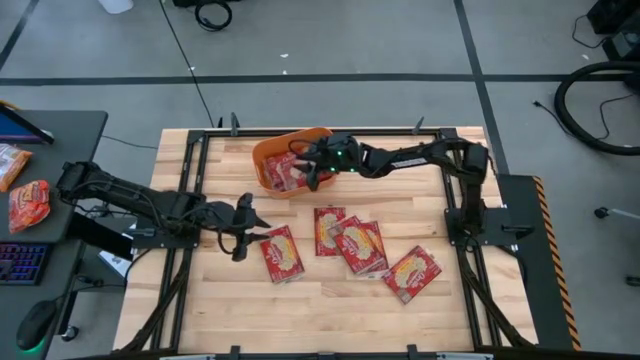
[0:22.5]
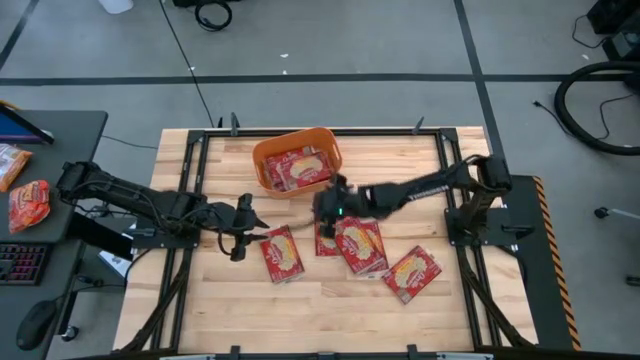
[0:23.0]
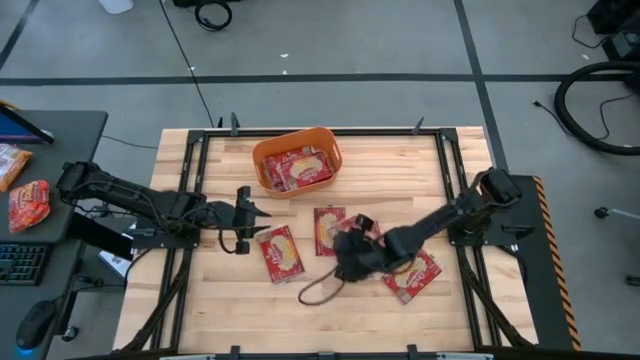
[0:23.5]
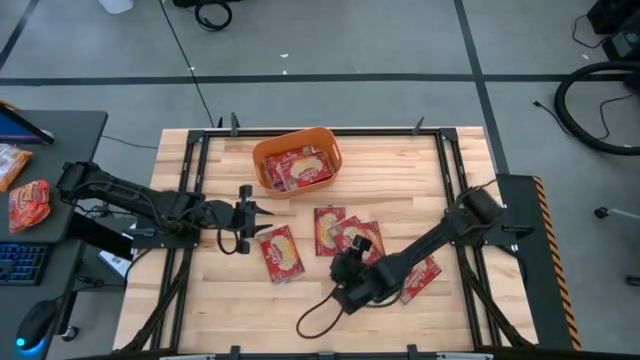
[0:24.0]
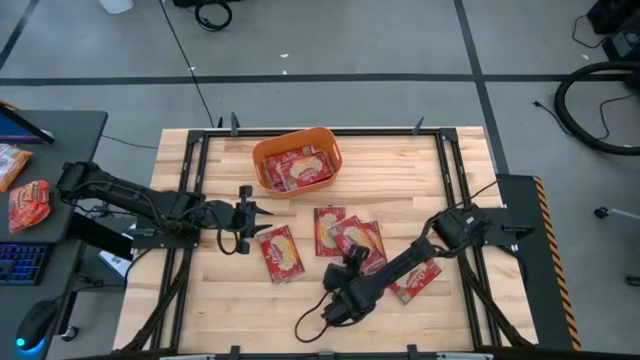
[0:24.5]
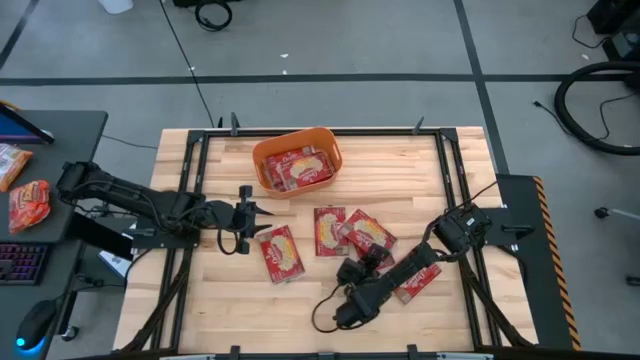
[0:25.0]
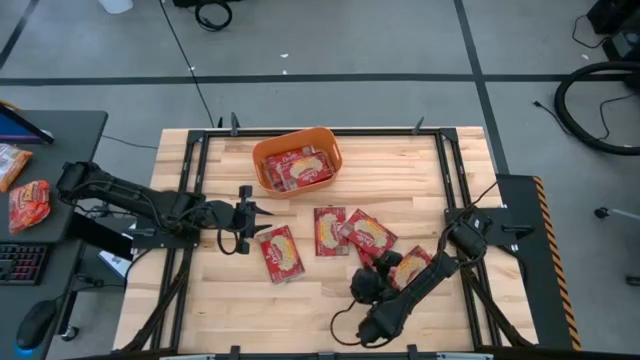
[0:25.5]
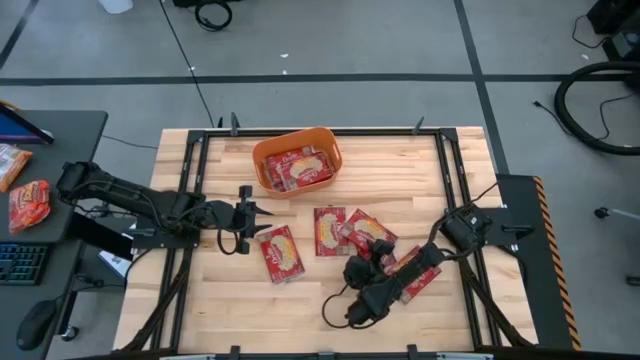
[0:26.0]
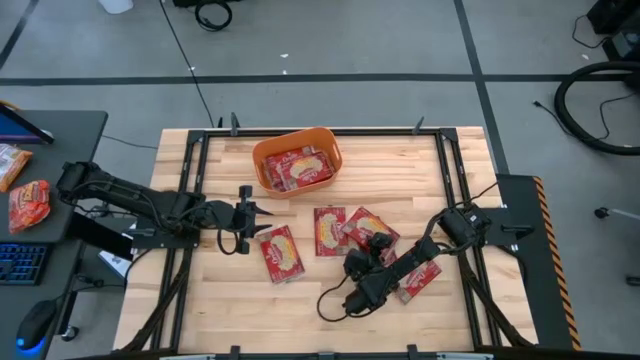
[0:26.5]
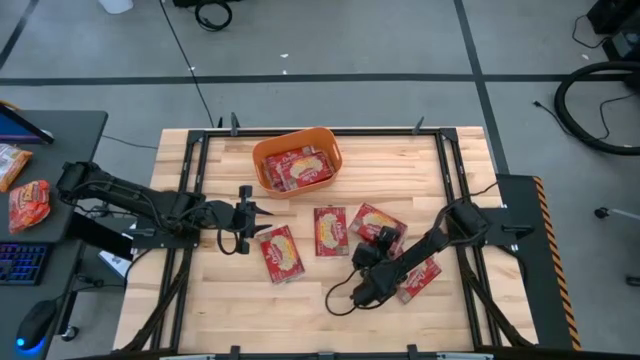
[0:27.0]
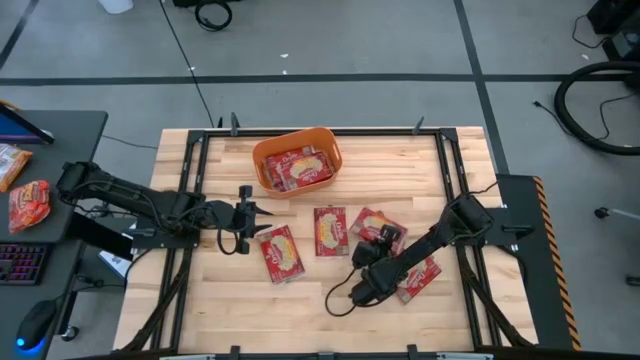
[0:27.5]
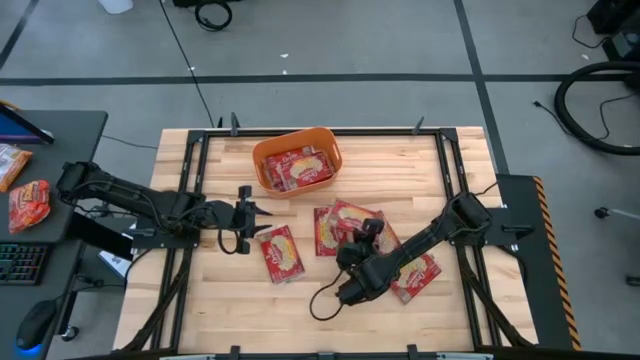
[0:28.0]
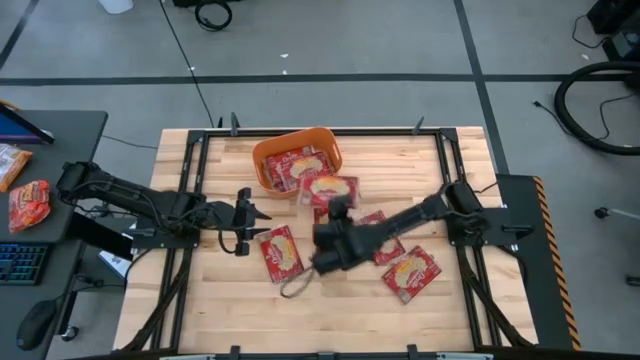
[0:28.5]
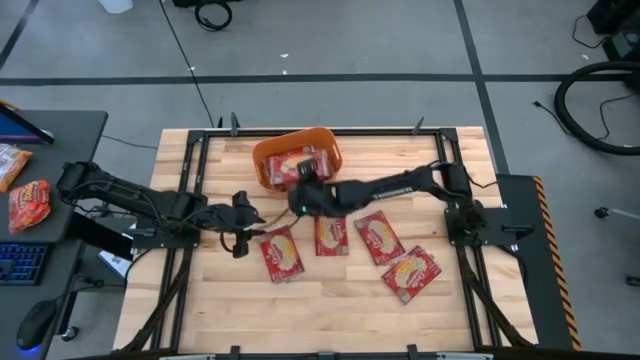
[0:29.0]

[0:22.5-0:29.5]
Task: Sort popcorn bags into baskets
Put the red popcorn bag into the orange bin

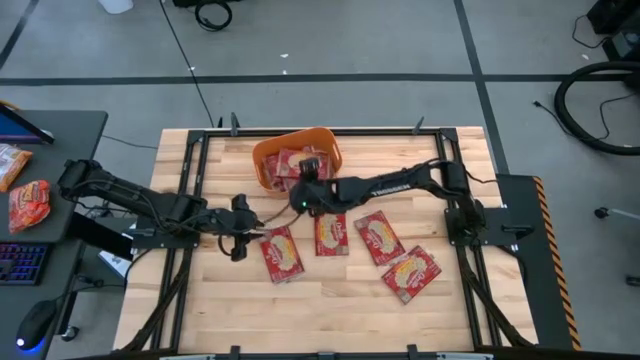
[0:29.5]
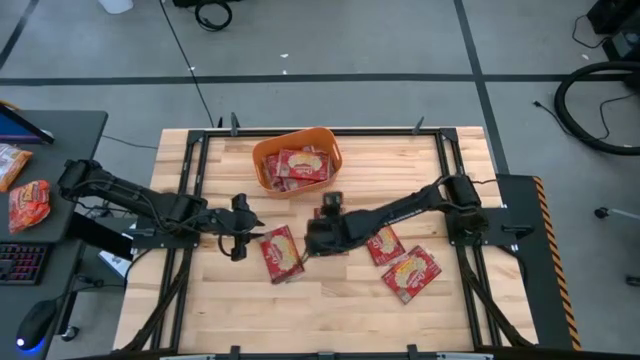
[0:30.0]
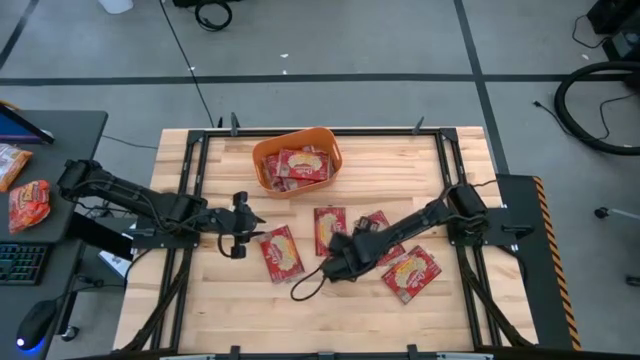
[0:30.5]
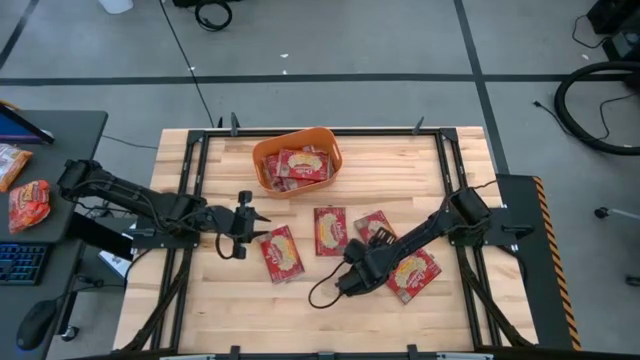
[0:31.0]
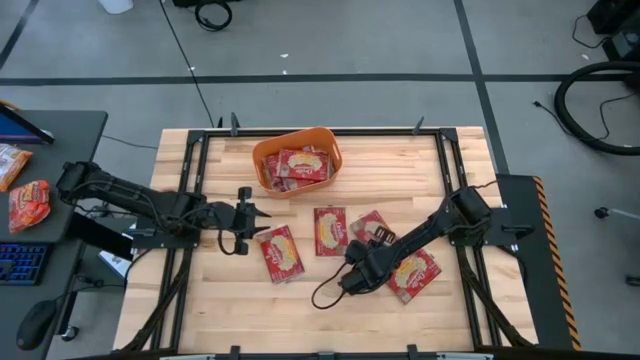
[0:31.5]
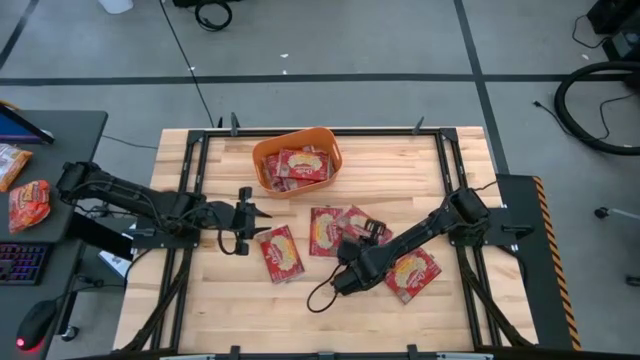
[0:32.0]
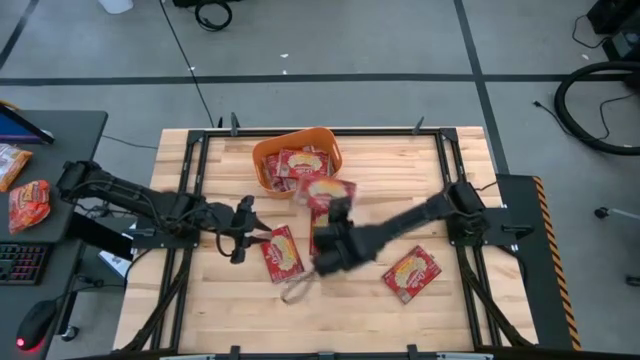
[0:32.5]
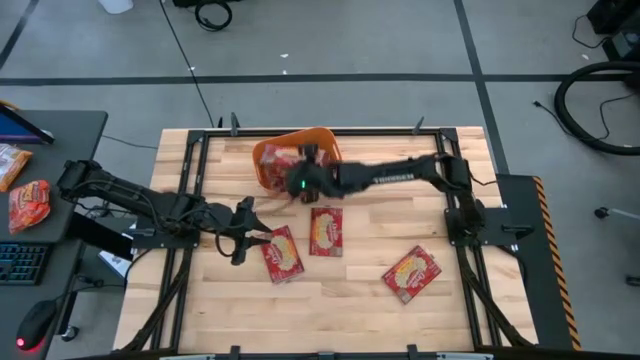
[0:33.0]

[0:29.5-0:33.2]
Put the red popcorn bag into the orange bin

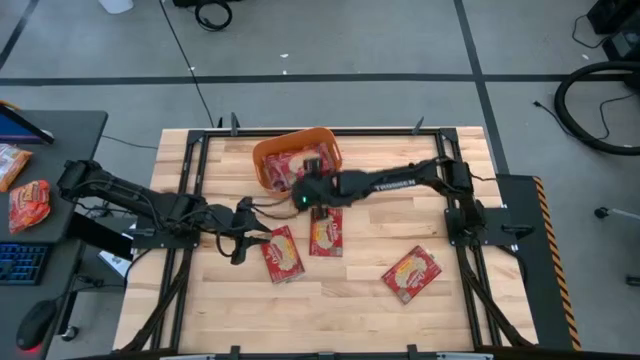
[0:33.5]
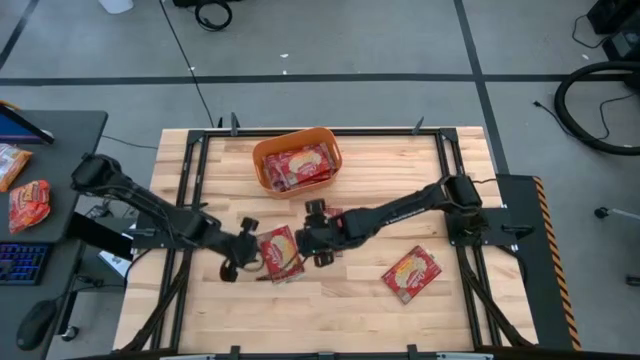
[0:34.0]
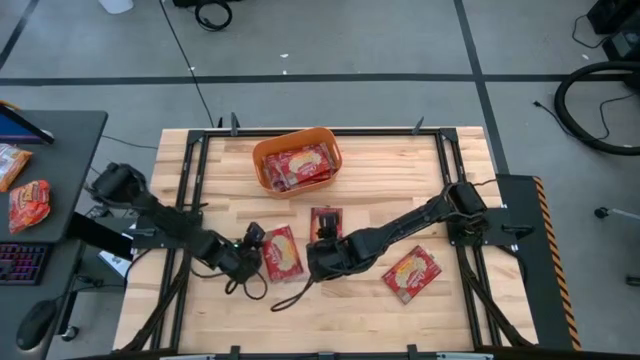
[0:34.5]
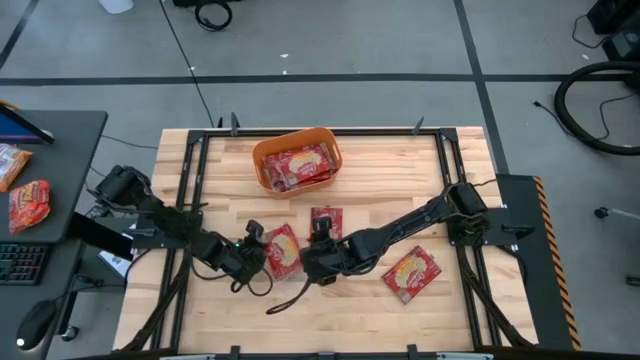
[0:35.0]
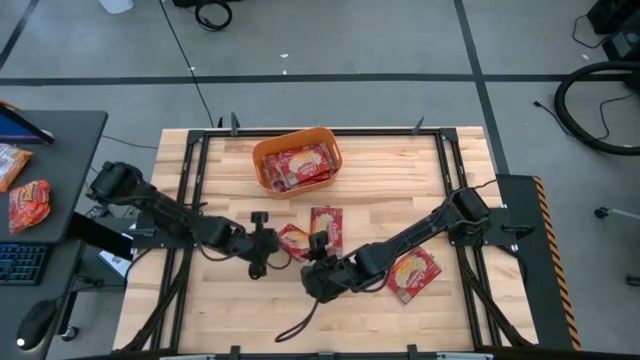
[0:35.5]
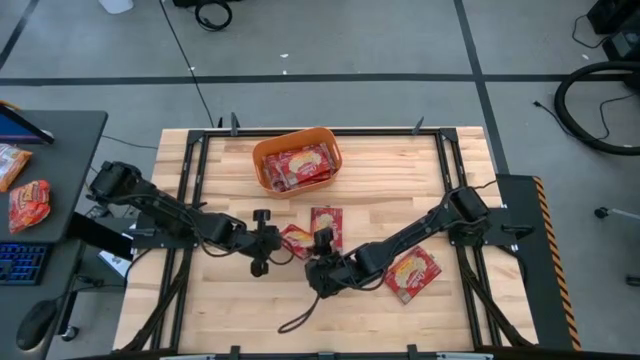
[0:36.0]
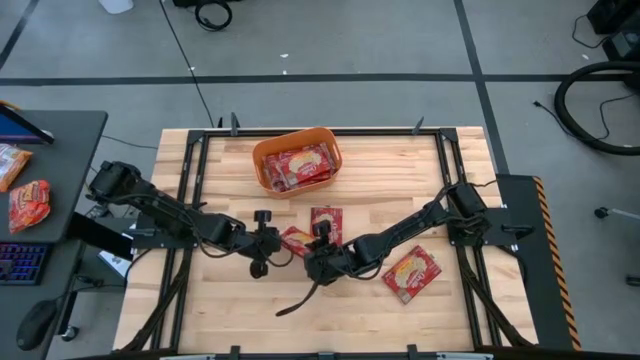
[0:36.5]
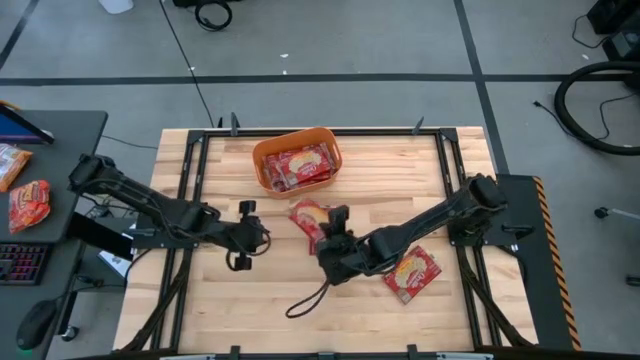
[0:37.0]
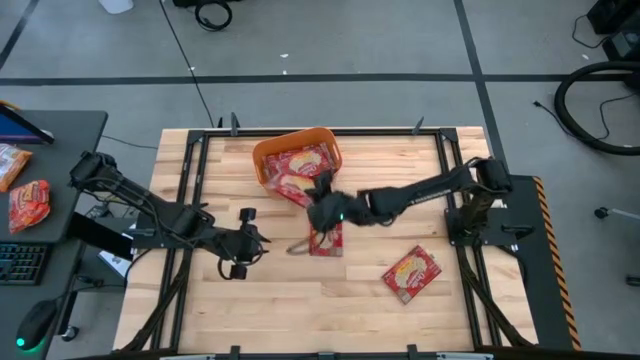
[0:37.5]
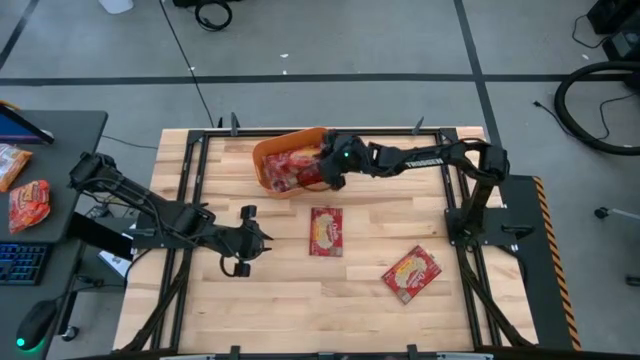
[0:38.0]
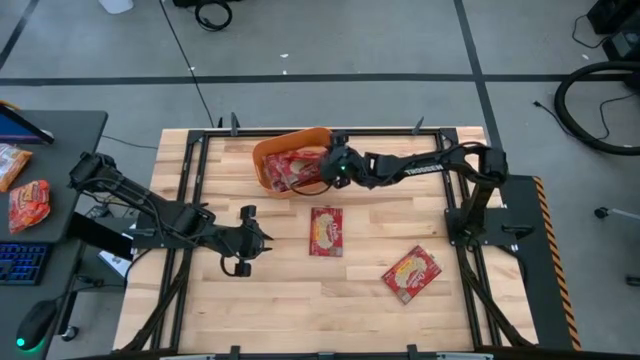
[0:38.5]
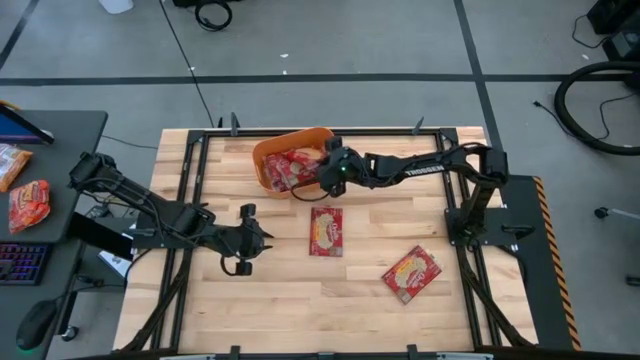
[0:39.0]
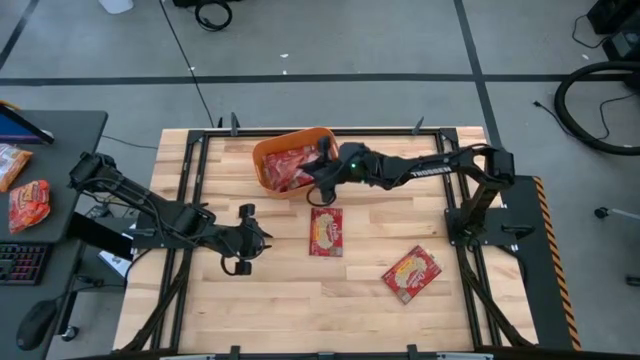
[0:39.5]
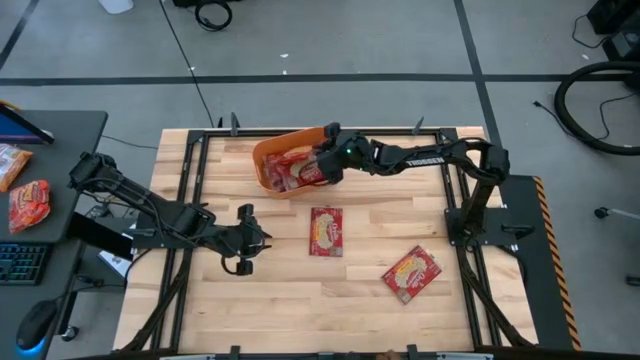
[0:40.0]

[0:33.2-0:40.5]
Put the red popcorn bag into the orange bin

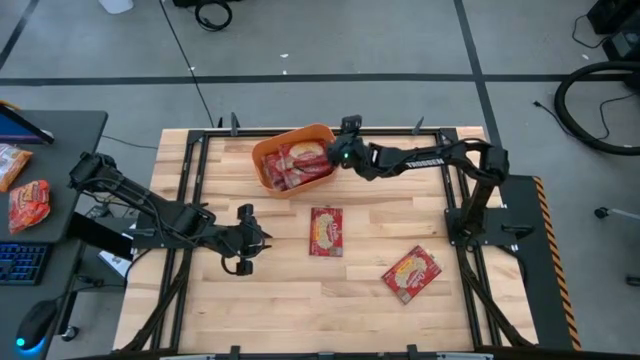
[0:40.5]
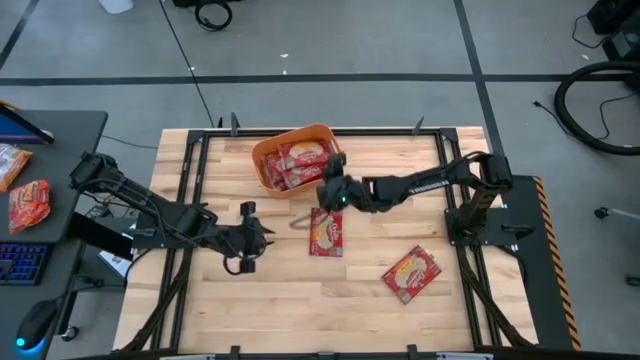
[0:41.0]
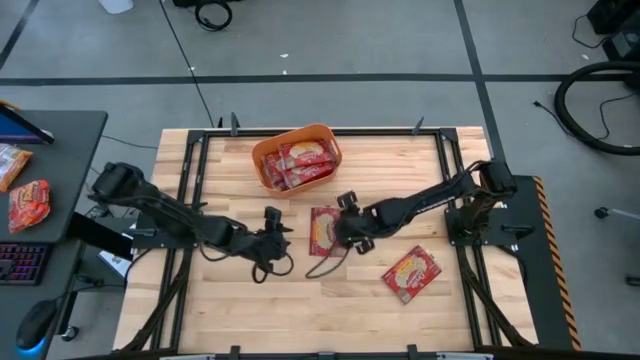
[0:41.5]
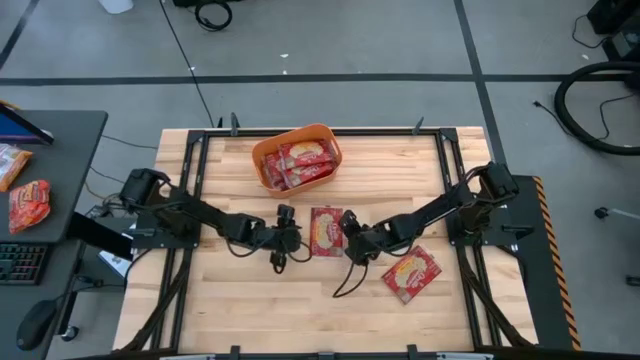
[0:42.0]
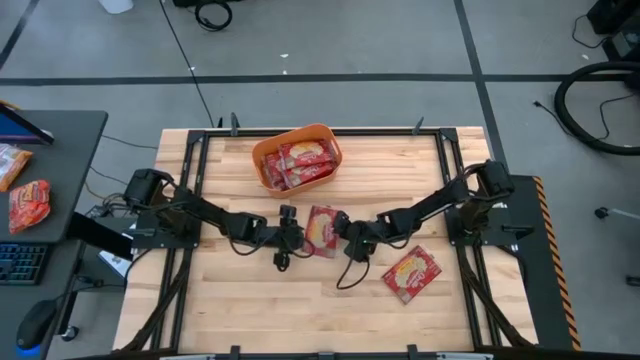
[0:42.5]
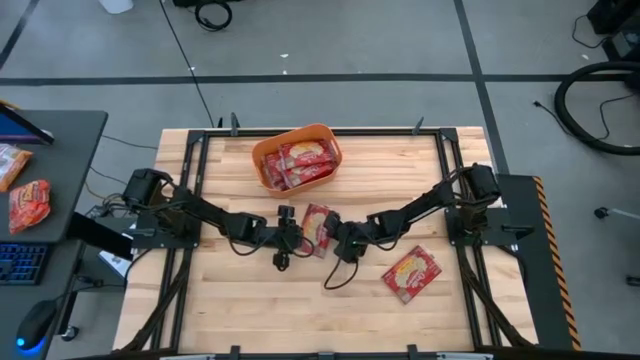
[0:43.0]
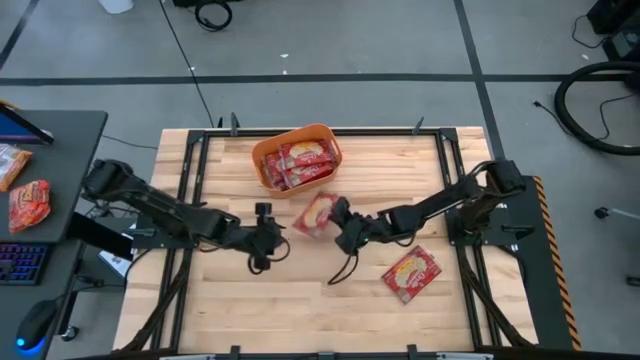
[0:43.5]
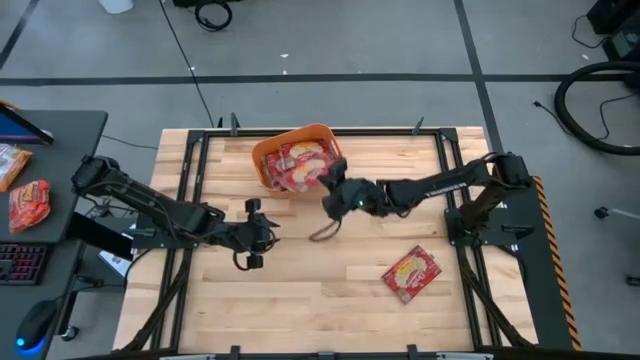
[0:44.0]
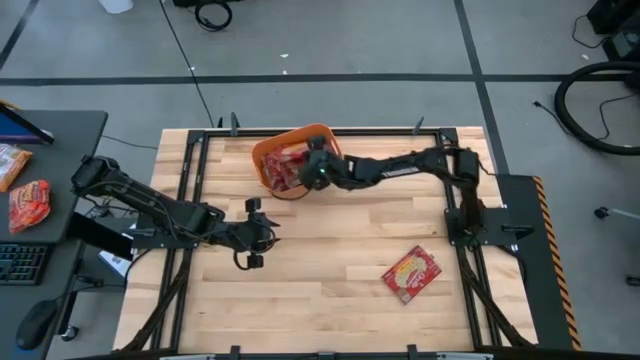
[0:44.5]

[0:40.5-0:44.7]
Put the red popcorn bag into the orange bin
